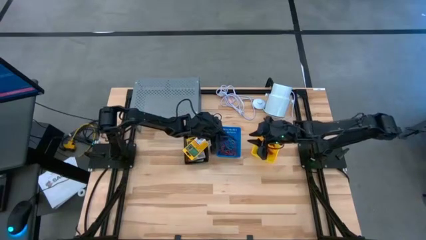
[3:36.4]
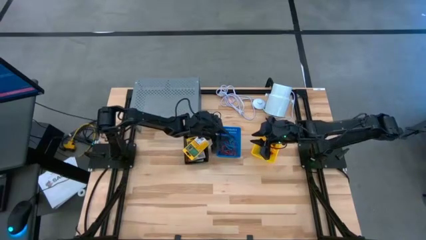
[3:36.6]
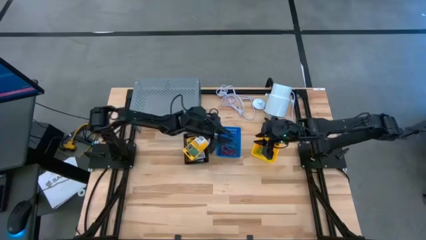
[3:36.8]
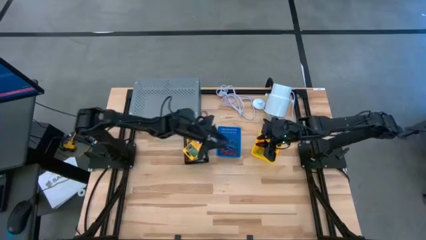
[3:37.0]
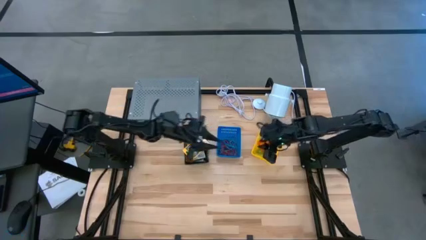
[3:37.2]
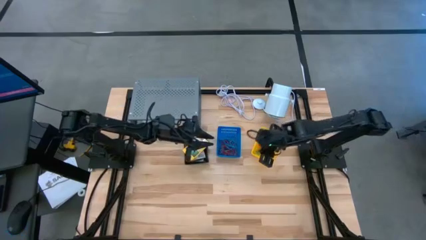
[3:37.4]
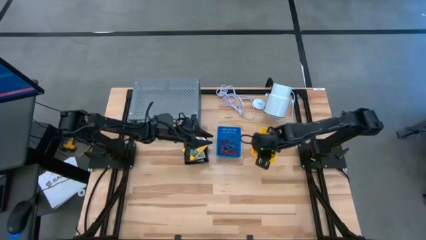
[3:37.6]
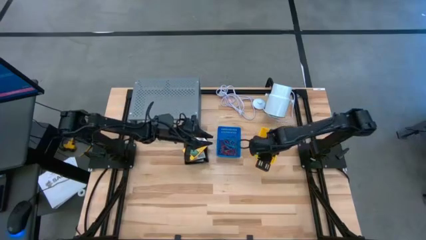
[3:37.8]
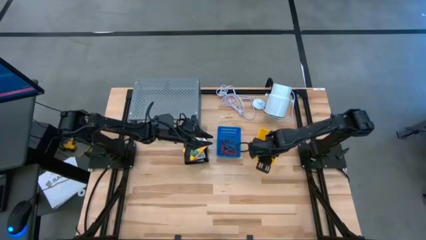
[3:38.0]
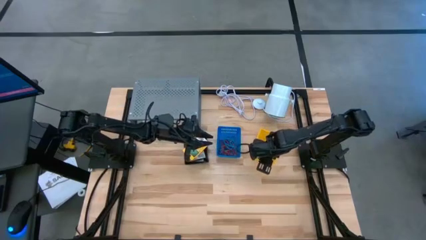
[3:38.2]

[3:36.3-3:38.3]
Task: Pick & Place Office Desk Supplies
Adjust the yellow basket containing the stretchable key holders

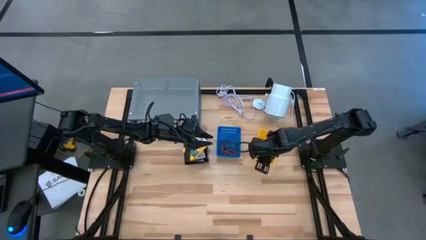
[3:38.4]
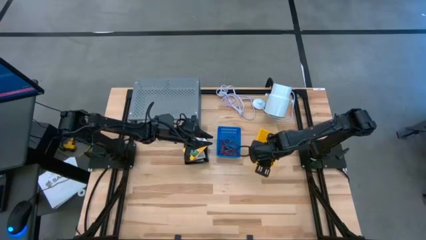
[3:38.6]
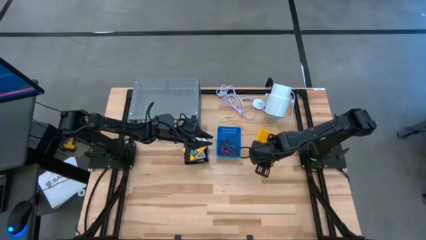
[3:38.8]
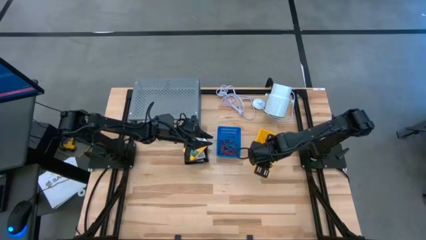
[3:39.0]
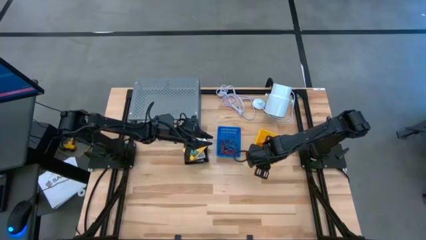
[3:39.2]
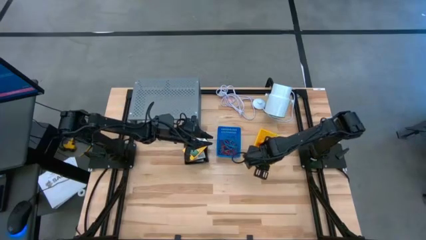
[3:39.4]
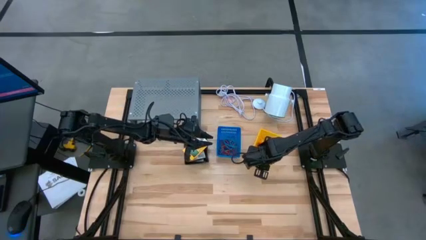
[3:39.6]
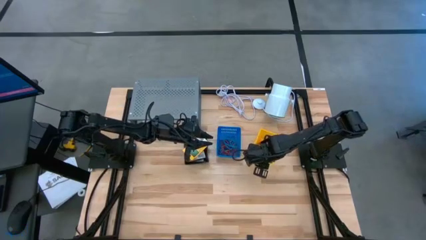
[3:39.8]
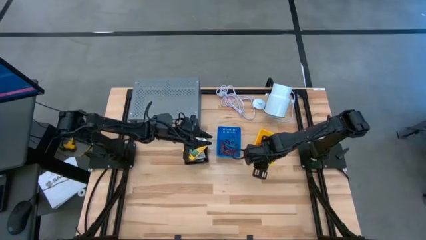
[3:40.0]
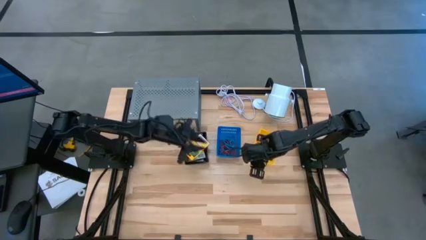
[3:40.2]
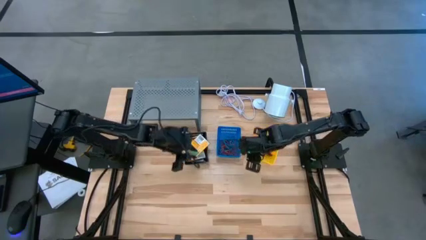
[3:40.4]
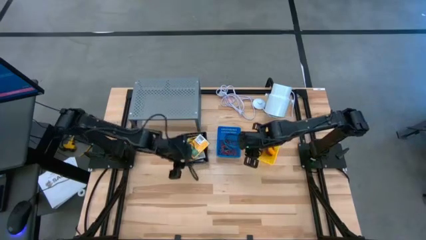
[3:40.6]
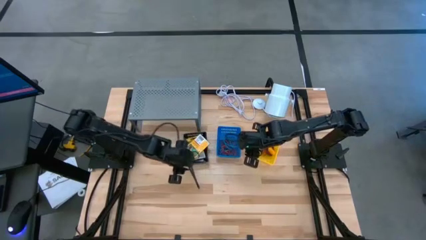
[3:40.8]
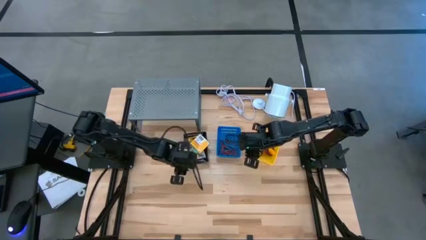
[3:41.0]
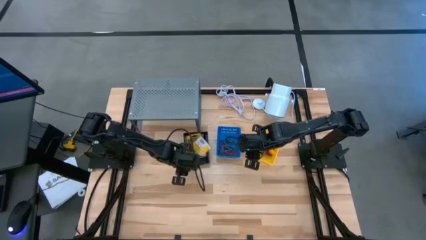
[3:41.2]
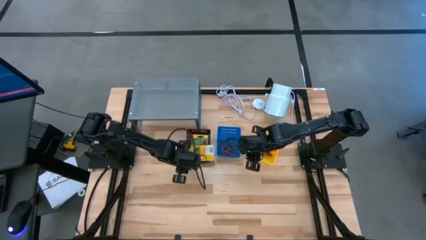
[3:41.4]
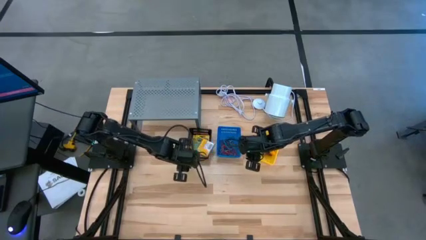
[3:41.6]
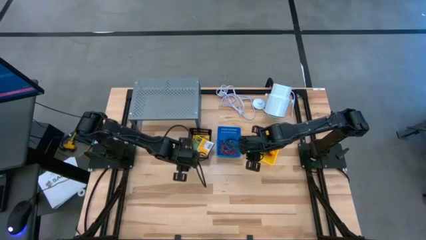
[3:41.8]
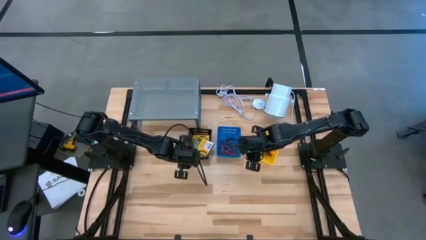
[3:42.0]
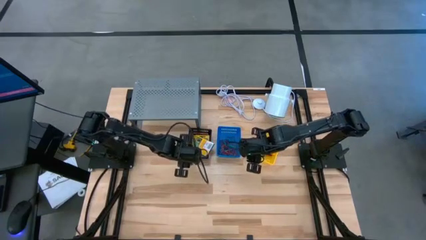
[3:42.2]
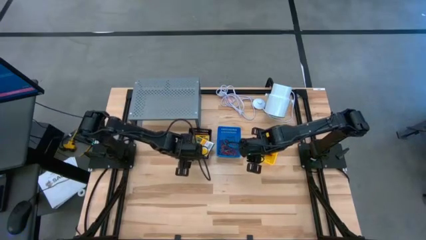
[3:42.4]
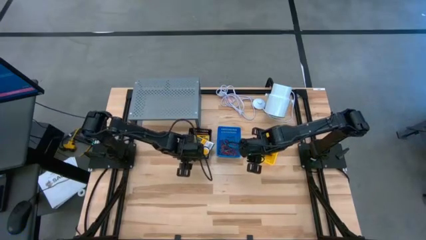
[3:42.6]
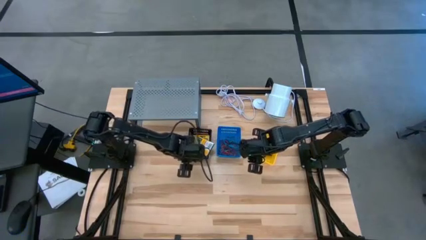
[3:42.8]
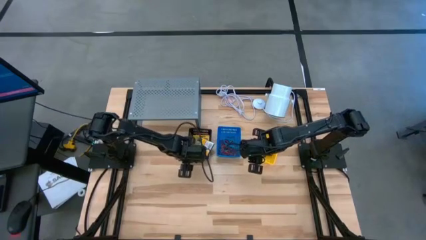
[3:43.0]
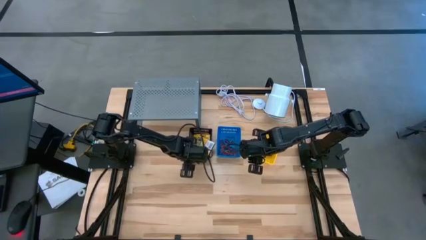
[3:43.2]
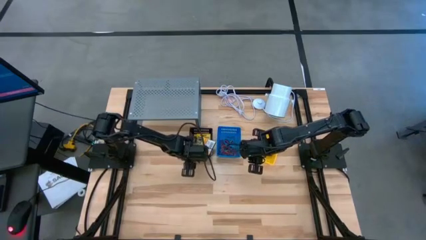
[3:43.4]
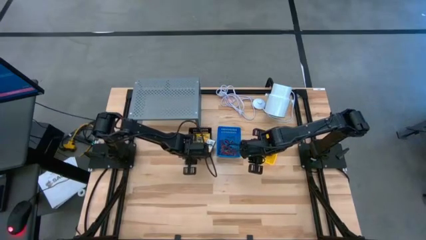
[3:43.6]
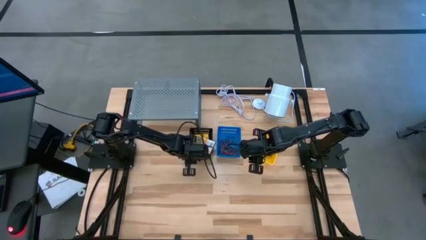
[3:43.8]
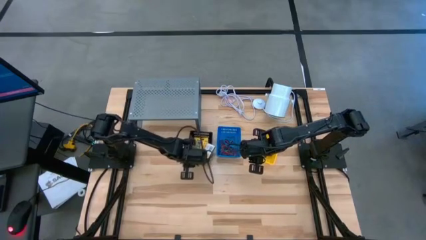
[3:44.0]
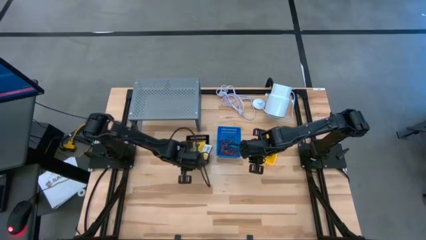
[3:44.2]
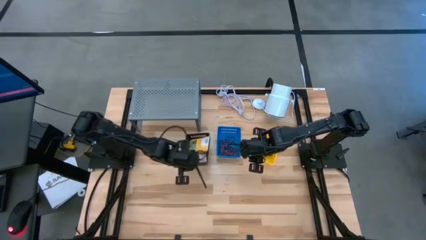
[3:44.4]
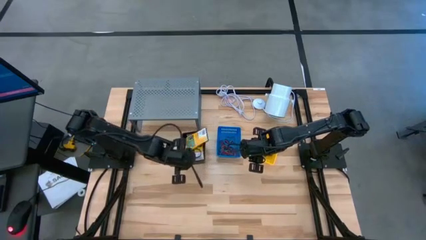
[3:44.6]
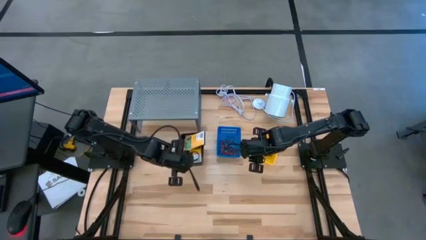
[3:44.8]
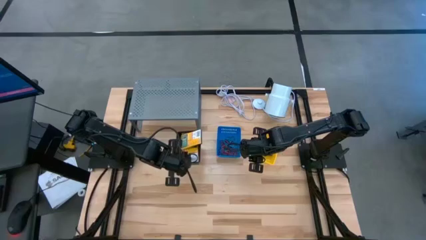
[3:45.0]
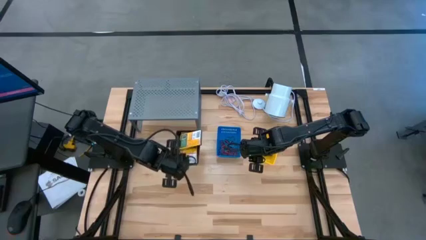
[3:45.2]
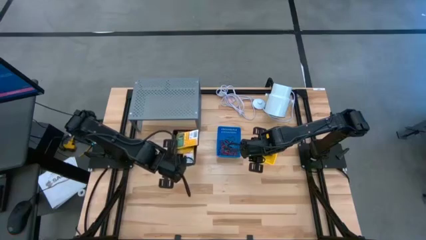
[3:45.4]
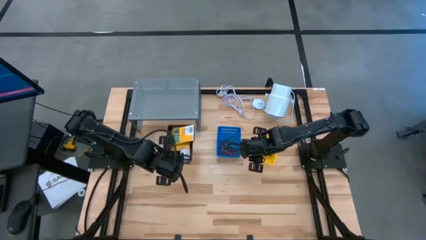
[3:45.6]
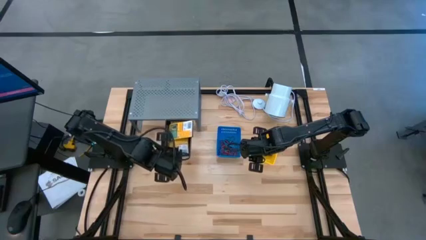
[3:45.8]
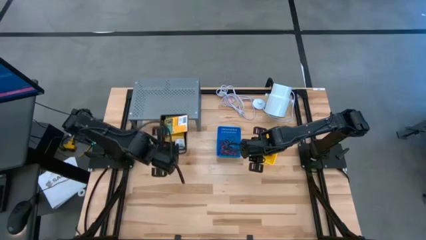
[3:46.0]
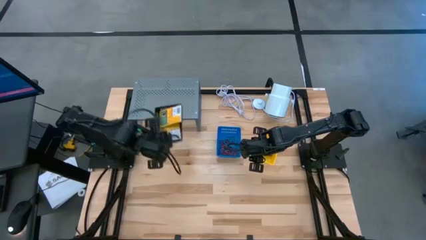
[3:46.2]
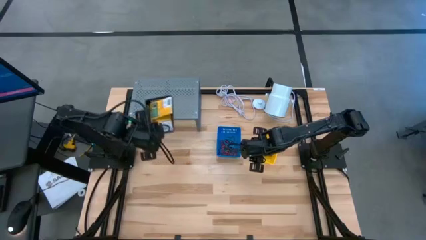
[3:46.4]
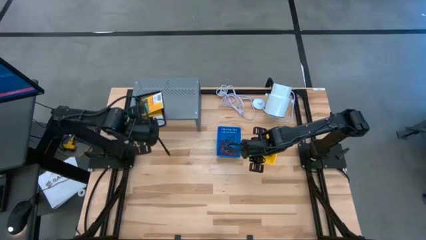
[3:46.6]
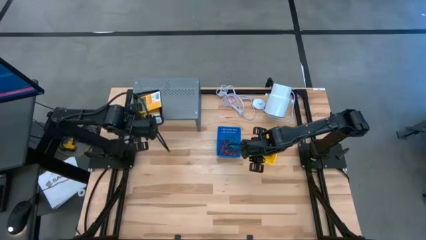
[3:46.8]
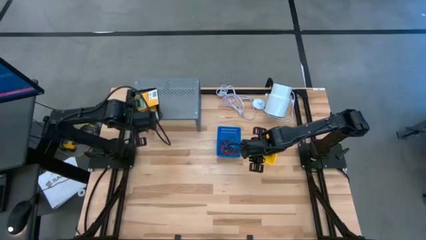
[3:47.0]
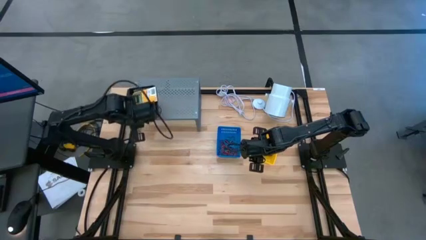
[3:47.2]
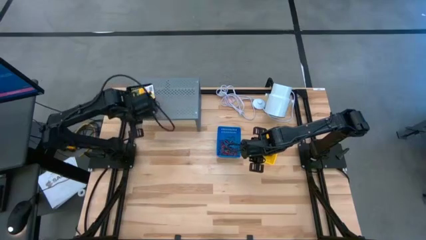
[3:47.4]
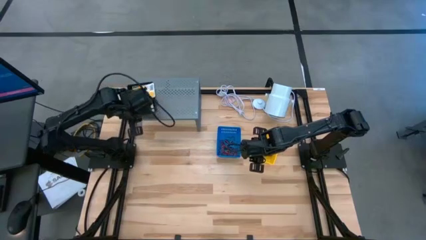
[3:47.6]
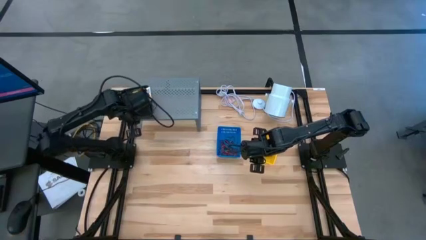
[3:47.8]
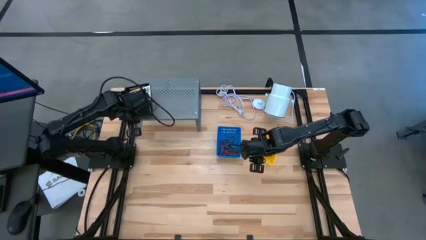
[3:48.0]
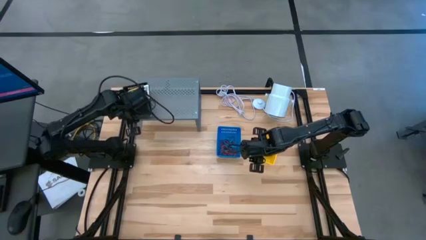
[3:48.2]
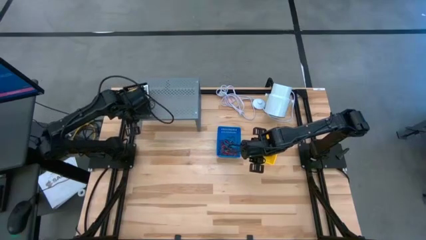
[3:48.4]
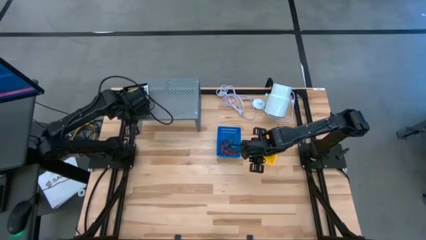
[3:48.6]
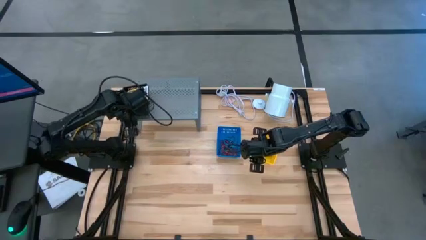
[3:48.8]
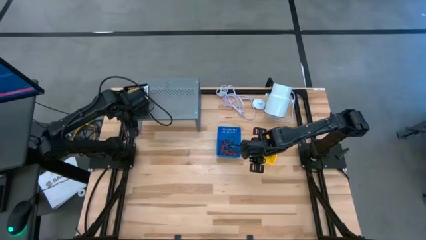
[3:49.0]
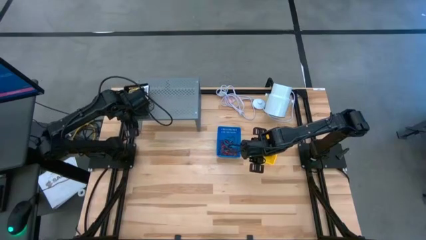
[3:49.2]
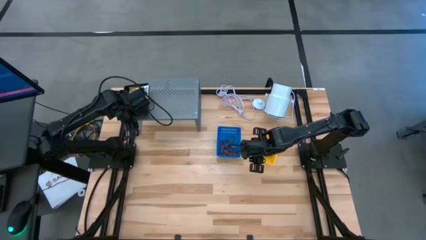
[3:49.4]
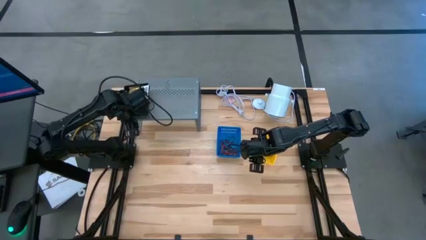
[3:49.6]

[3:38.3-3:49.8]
Put the black basket containing the crayon boxes on the shelf
